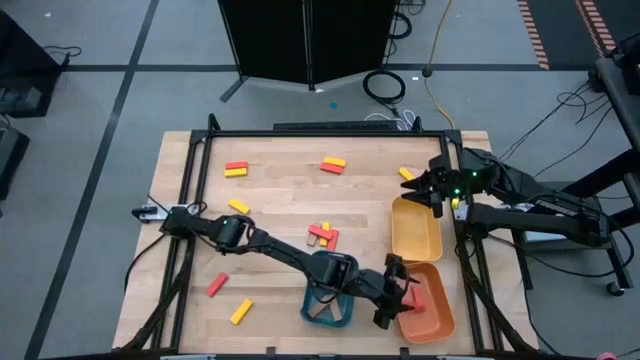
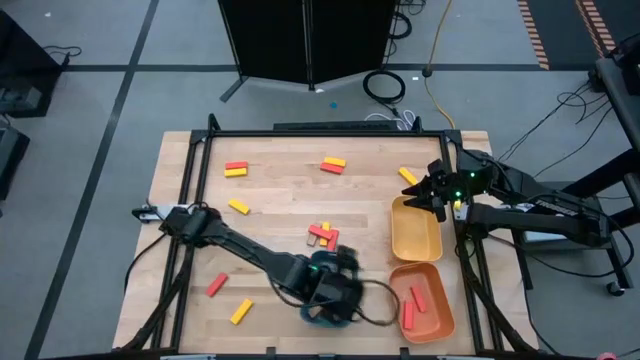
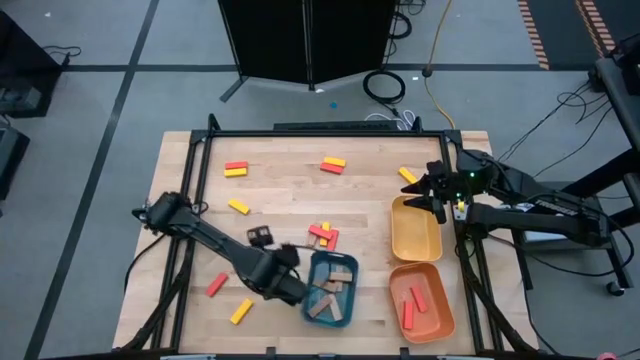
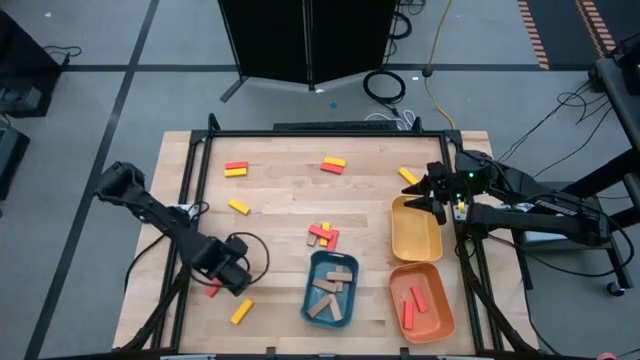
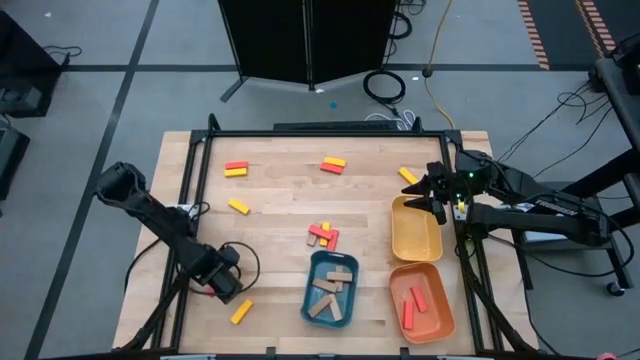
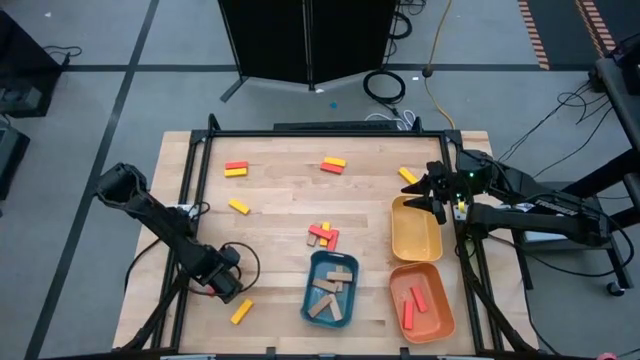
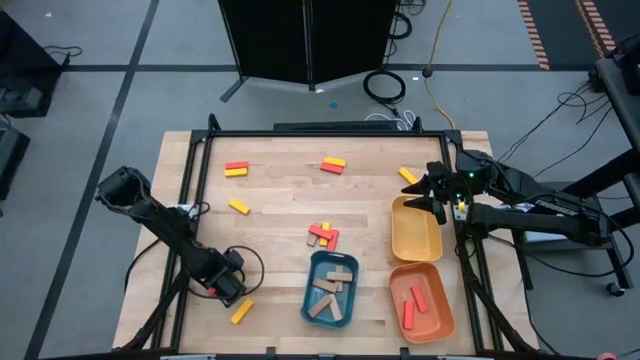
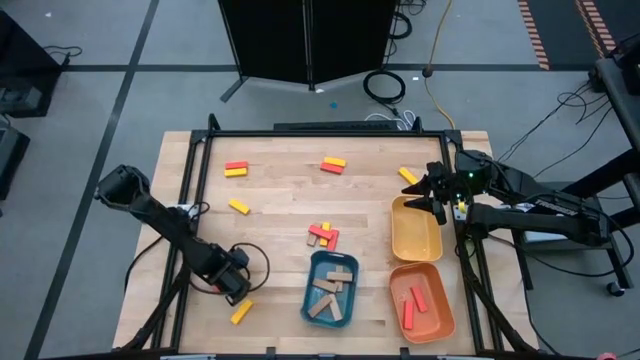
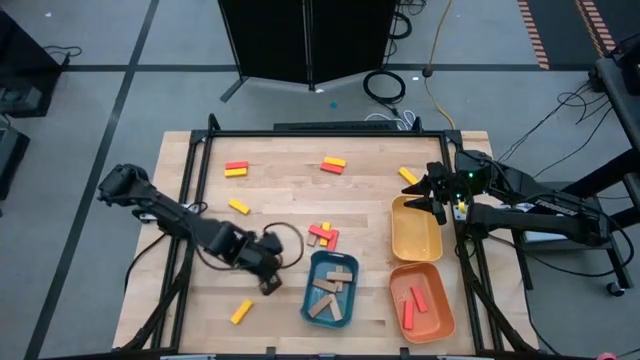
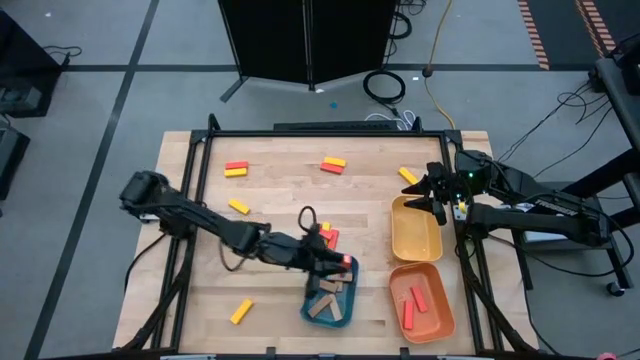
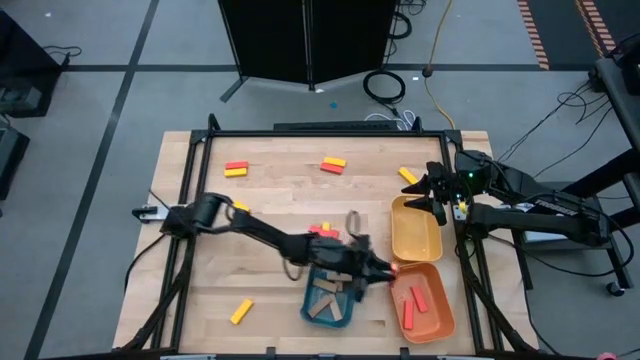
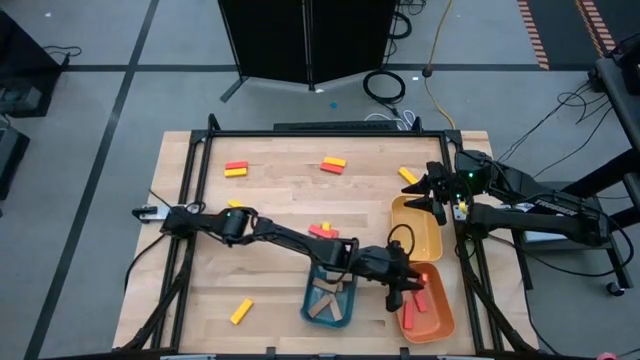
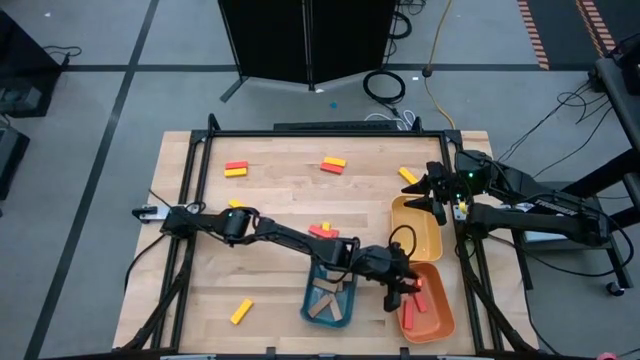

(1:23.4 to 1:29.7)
Task: Sort blocks
Put the orange block into the orange bin

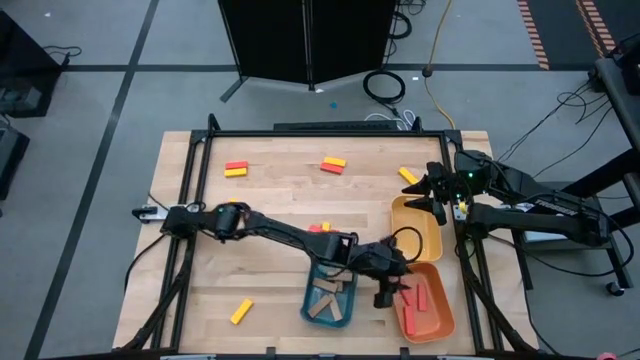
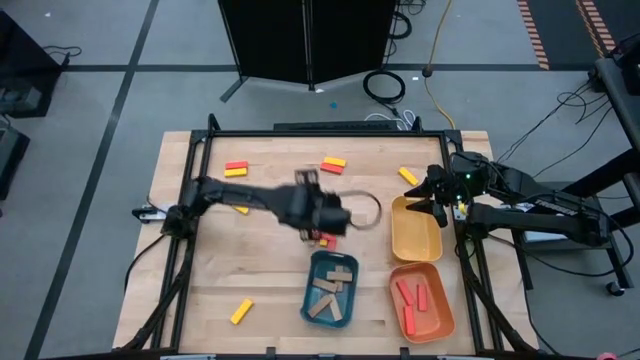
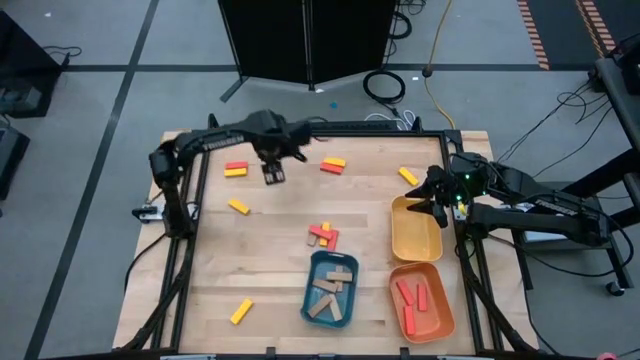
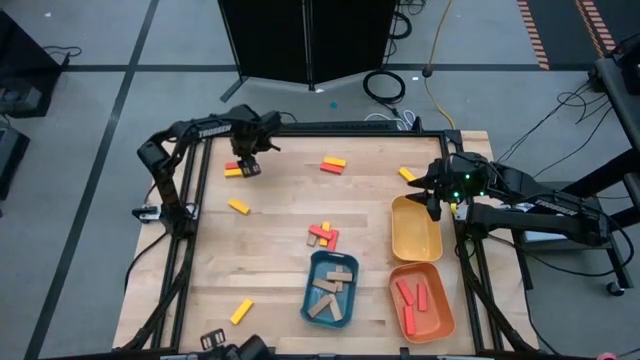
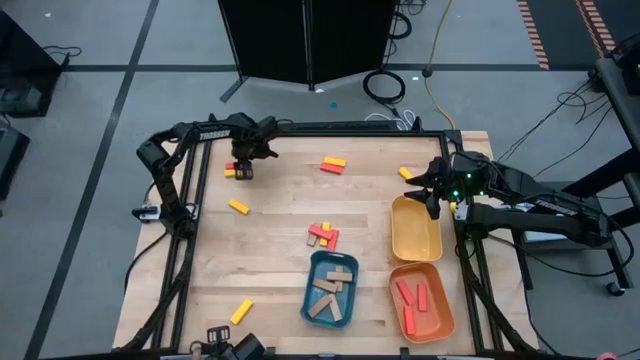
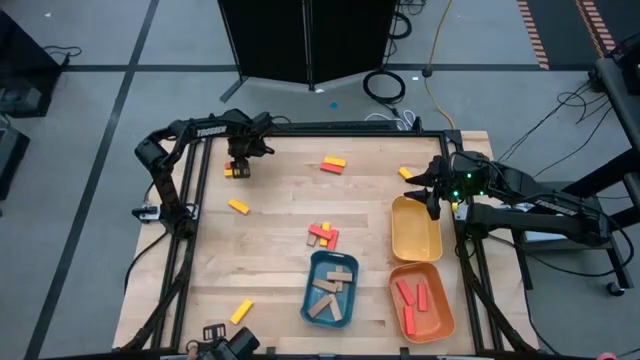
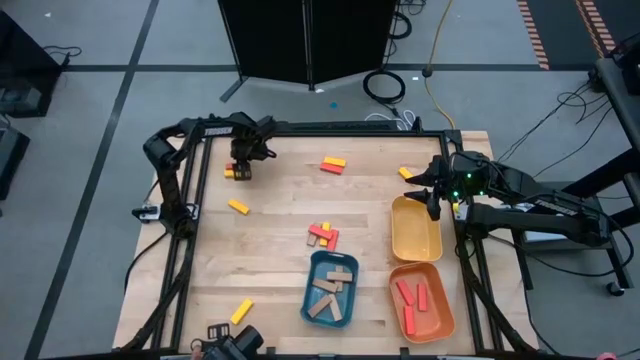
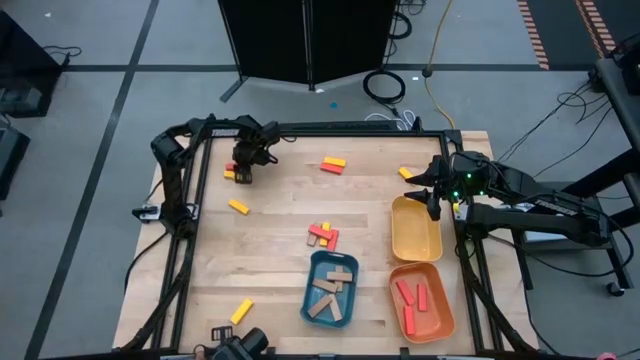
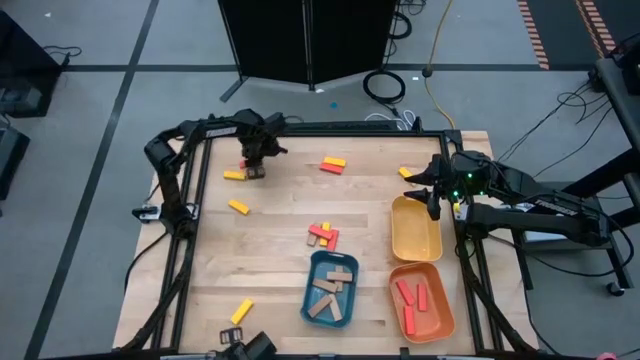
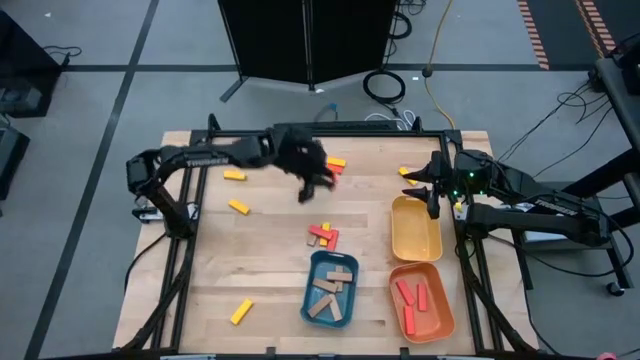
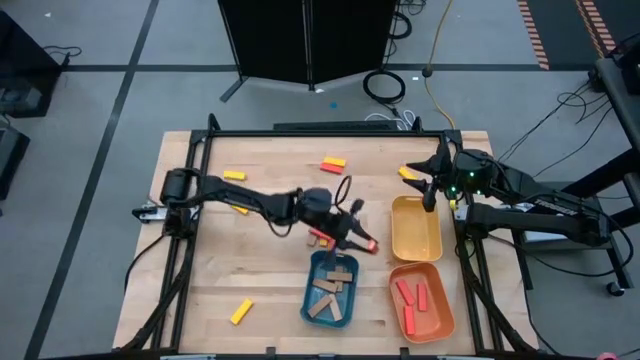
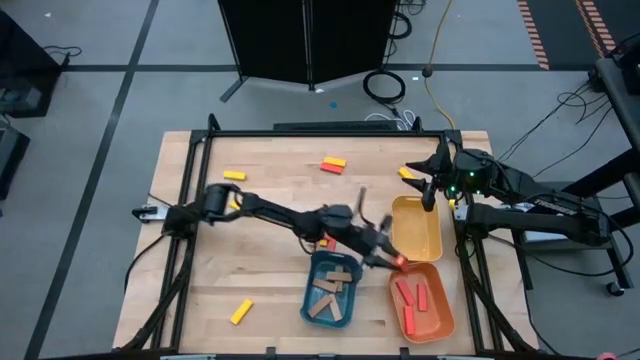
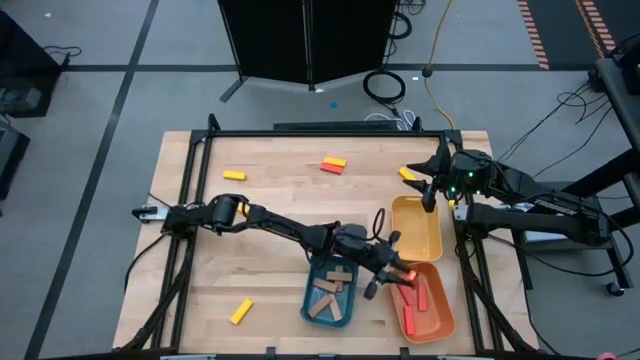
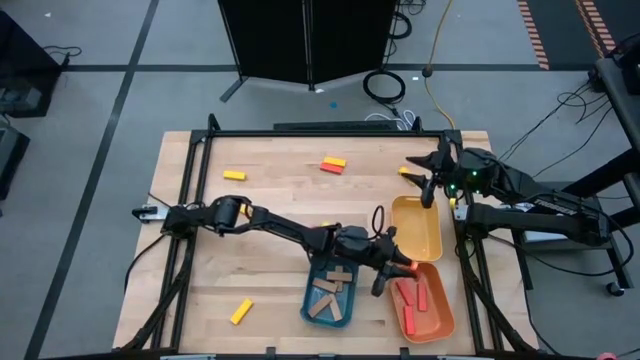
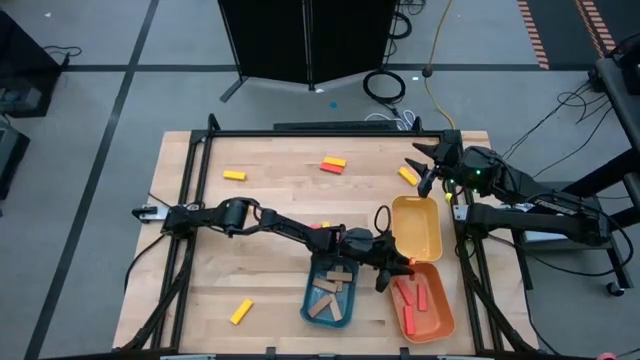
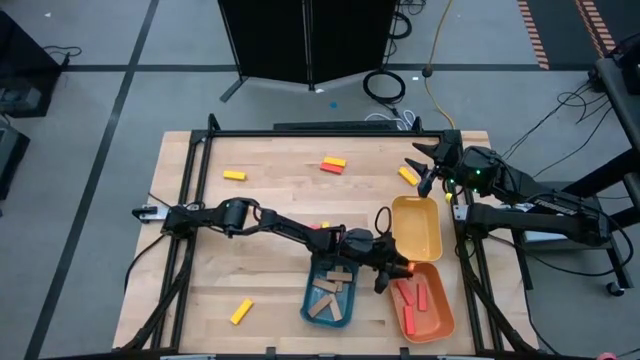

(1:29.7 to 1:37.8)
Put the orange block into the orange bin

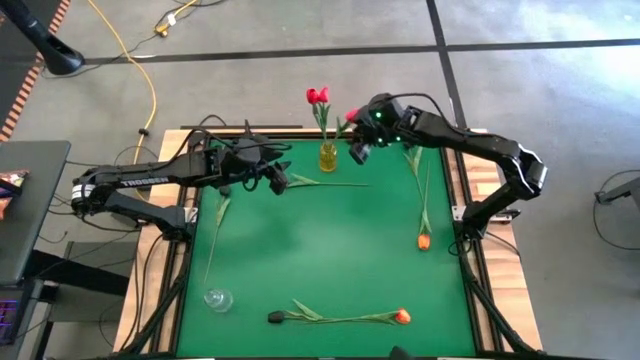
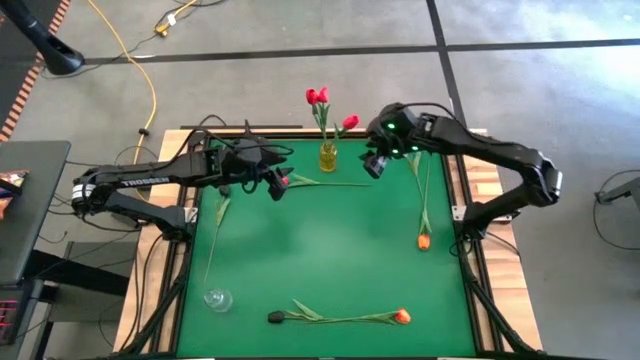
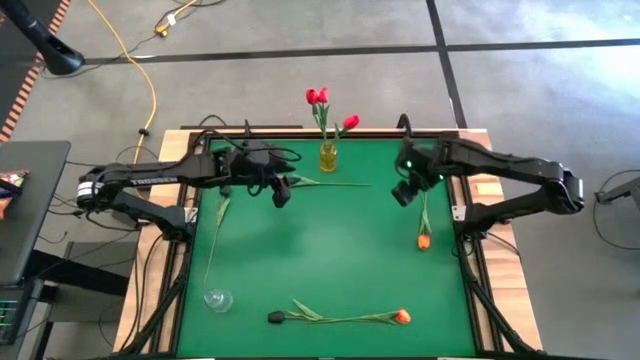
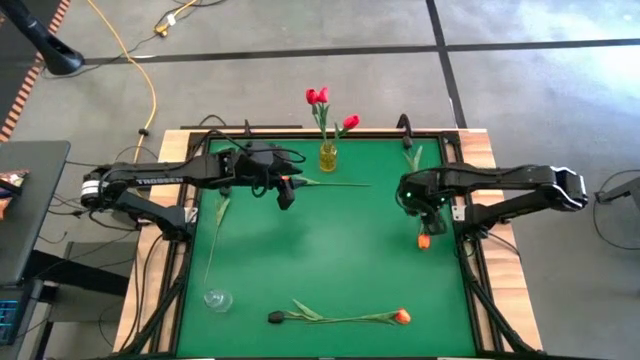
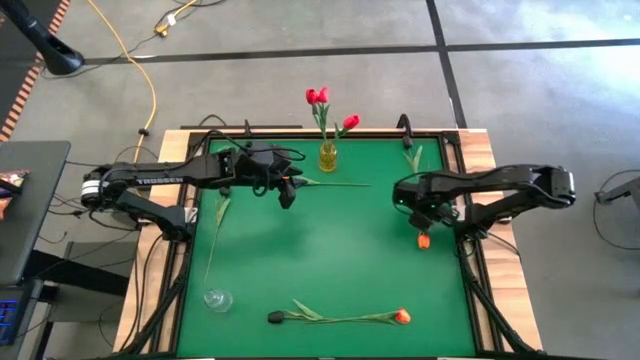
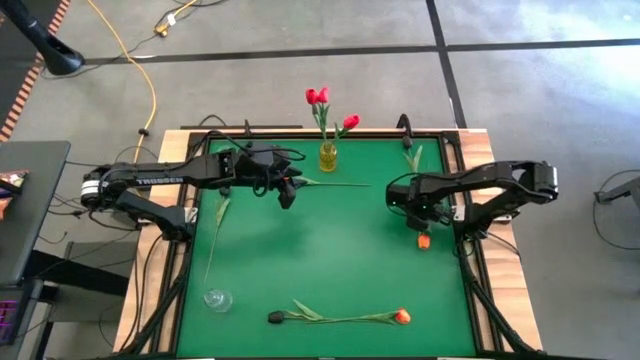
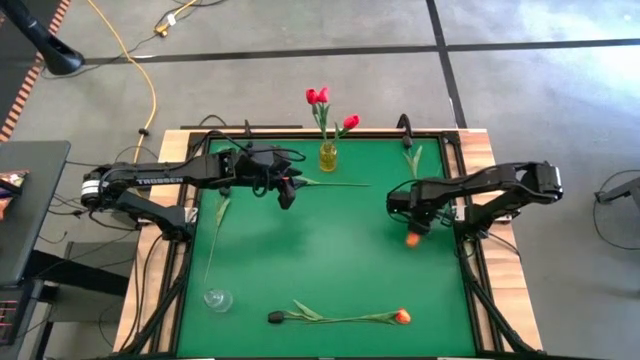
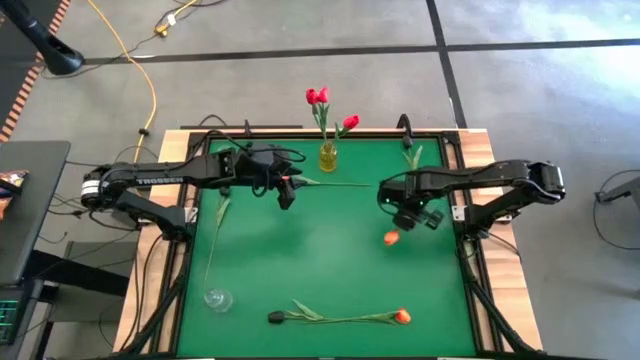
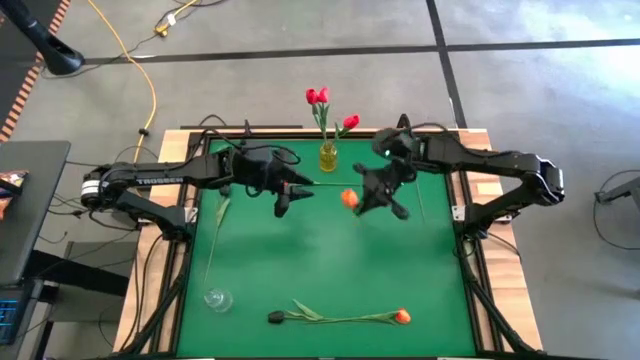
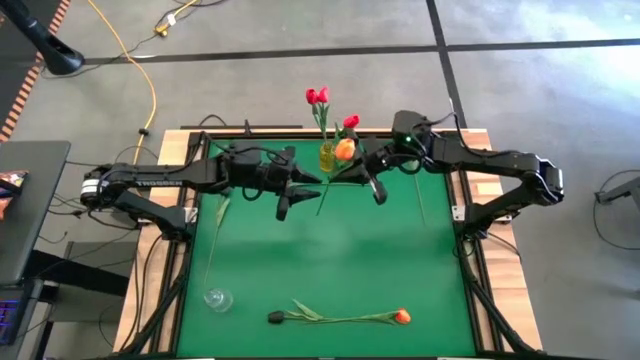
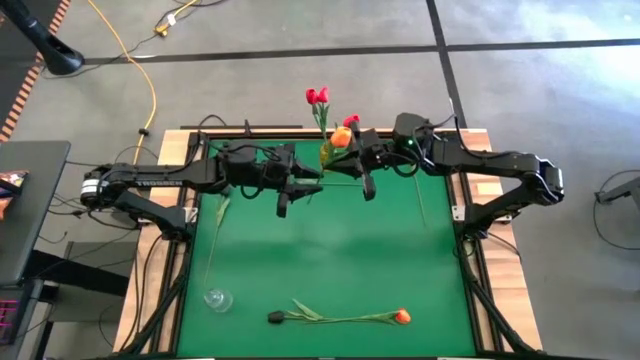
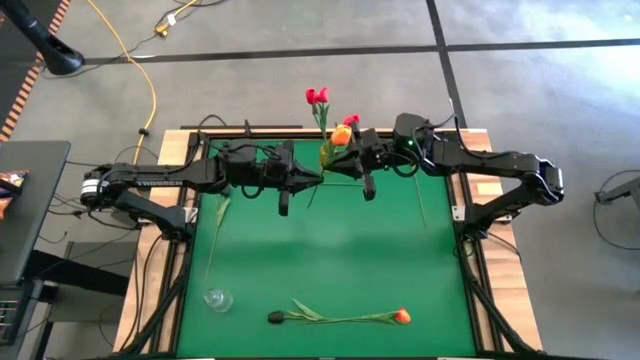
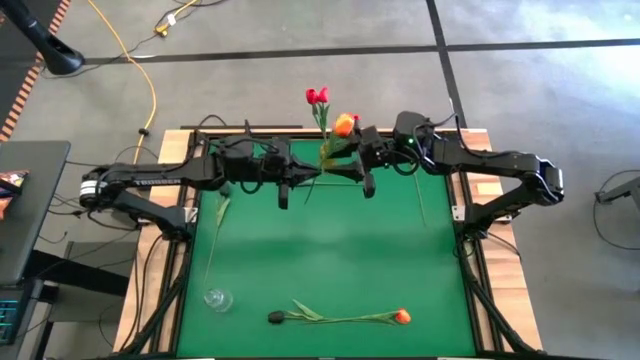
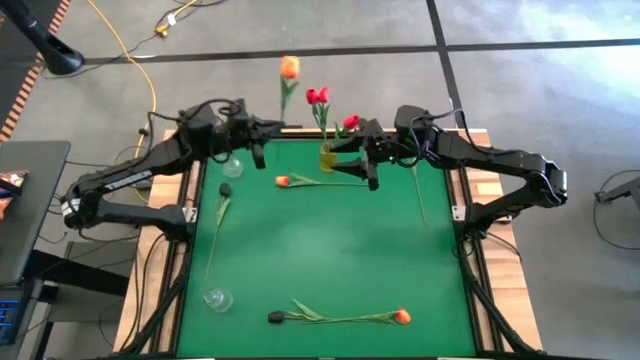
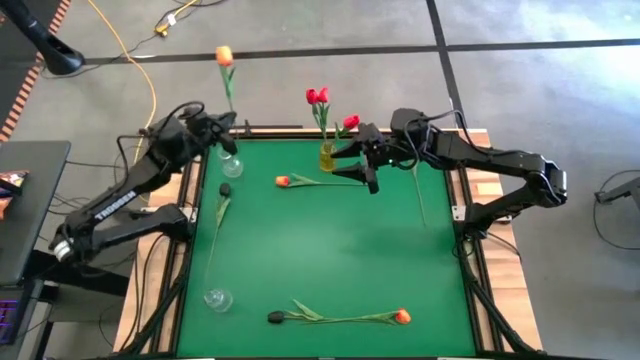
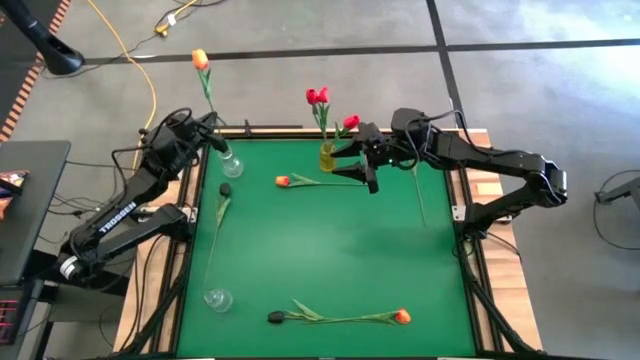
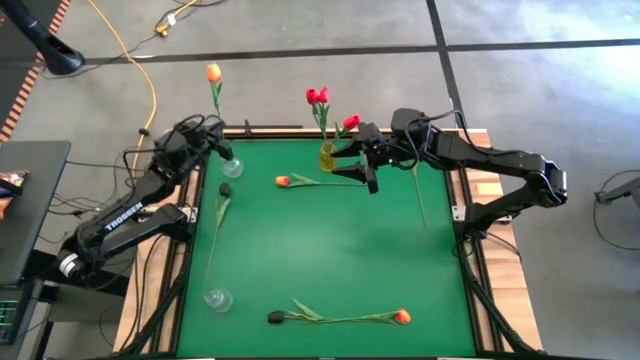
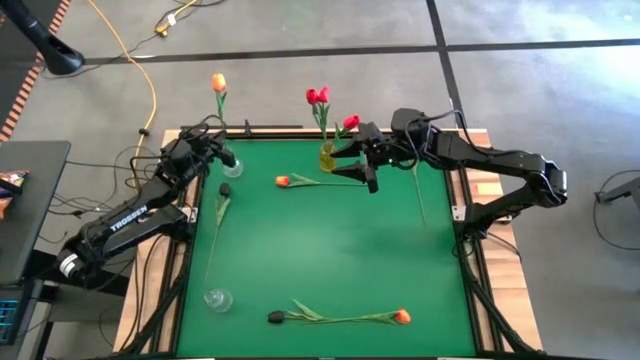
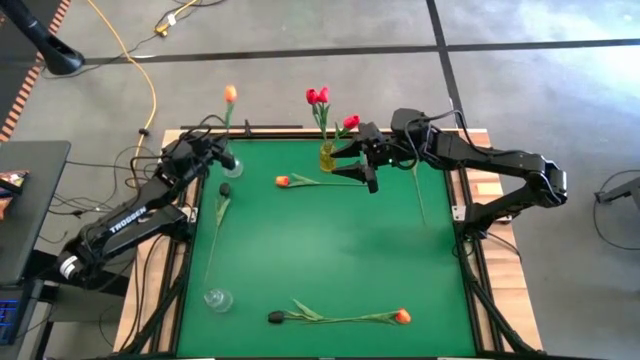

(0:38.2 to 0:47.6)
Task: Sort flowers into vase by color
Put the middle right orange flower into the top transparent vase
